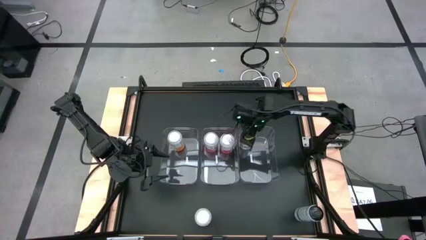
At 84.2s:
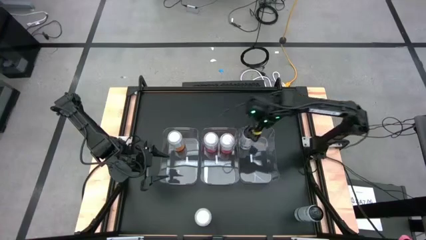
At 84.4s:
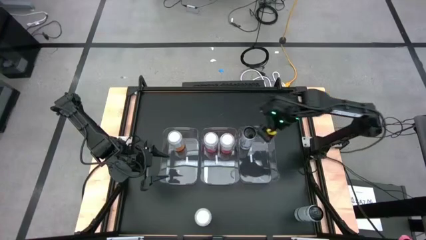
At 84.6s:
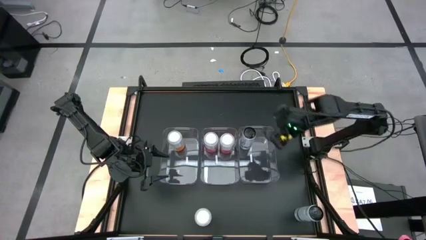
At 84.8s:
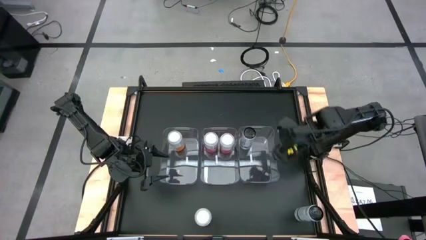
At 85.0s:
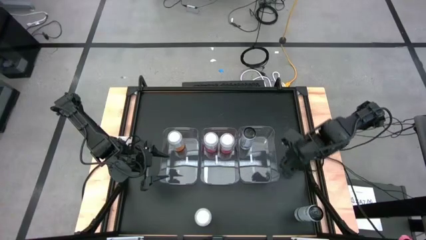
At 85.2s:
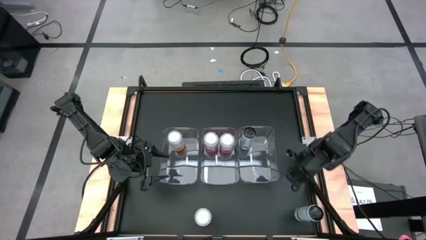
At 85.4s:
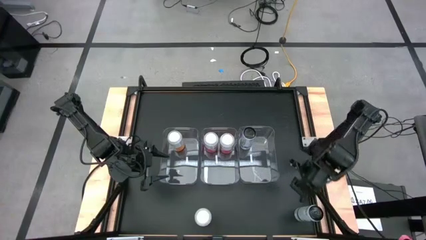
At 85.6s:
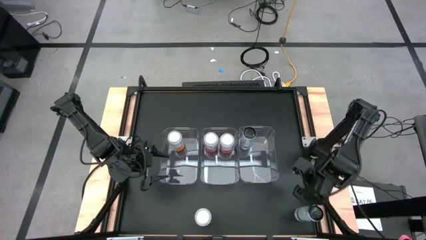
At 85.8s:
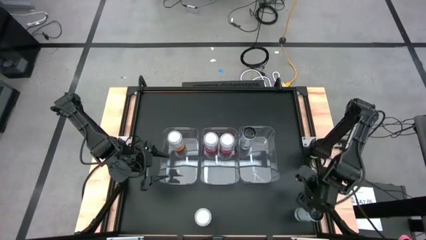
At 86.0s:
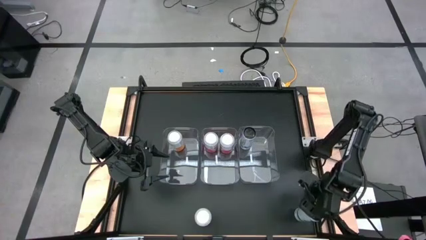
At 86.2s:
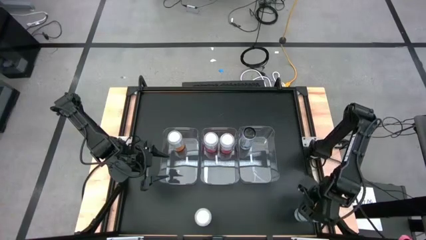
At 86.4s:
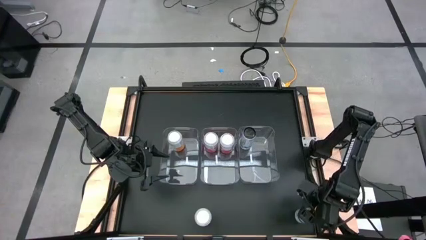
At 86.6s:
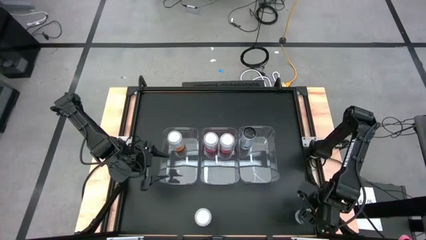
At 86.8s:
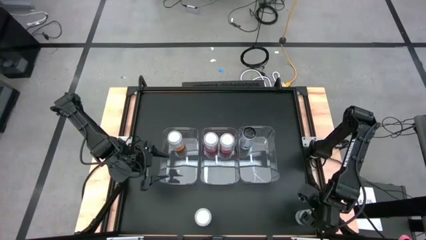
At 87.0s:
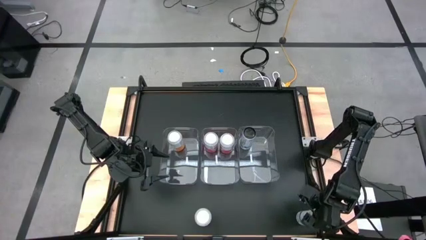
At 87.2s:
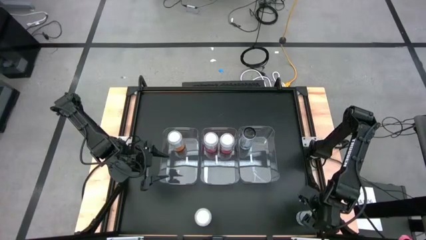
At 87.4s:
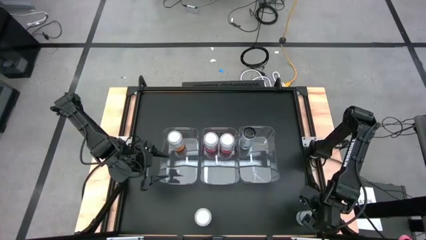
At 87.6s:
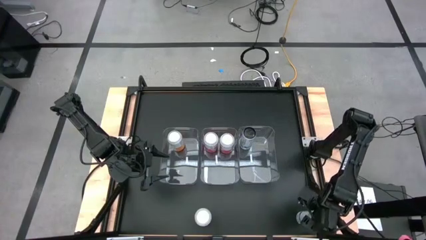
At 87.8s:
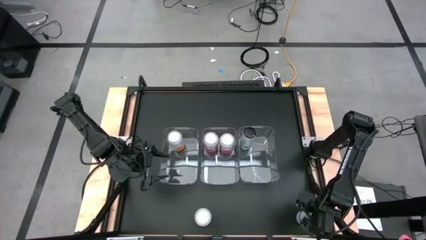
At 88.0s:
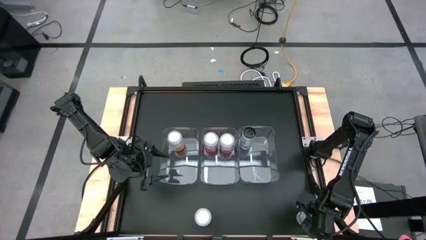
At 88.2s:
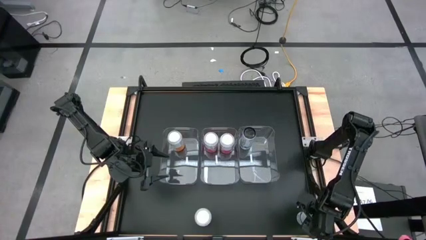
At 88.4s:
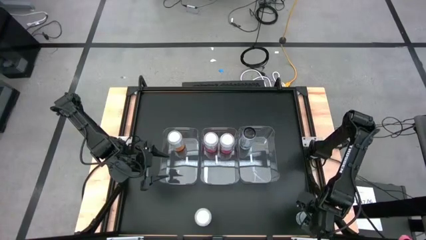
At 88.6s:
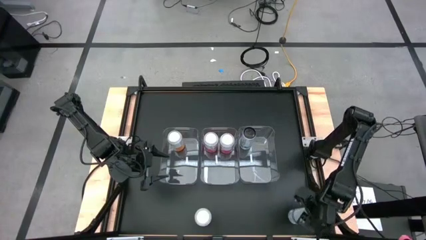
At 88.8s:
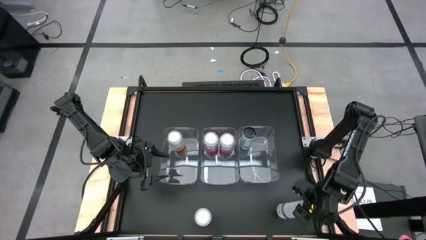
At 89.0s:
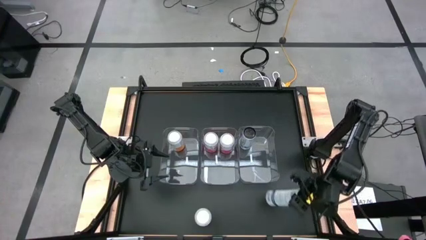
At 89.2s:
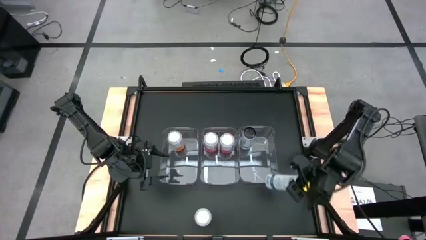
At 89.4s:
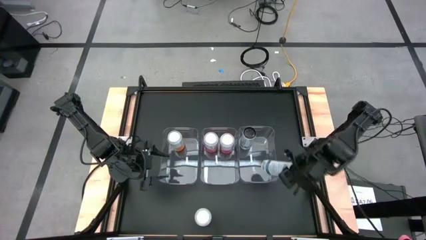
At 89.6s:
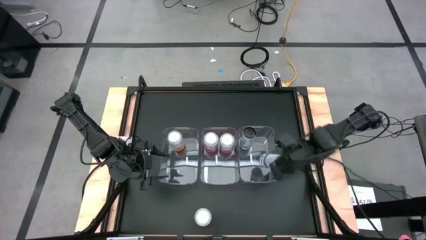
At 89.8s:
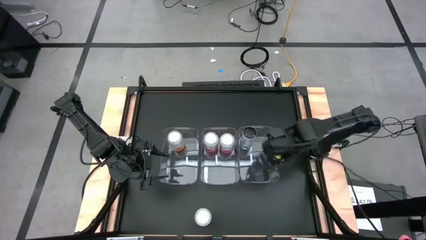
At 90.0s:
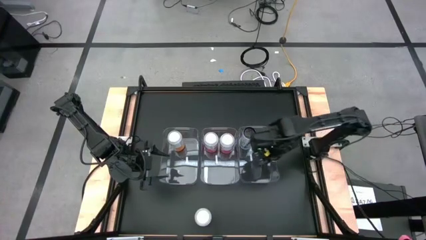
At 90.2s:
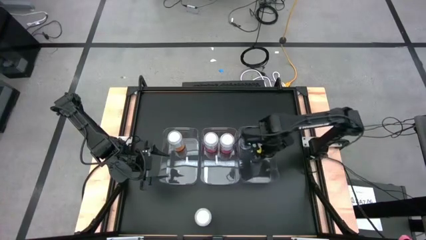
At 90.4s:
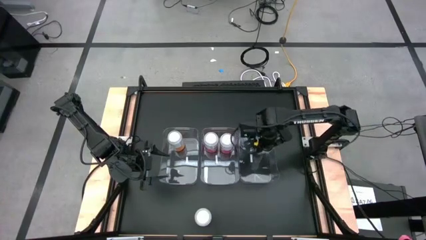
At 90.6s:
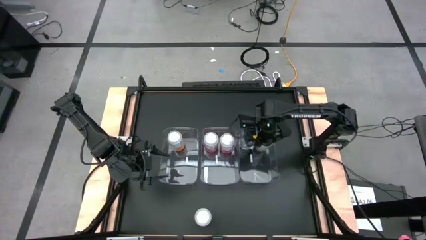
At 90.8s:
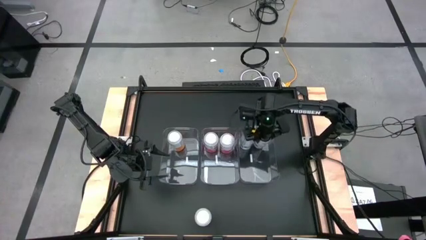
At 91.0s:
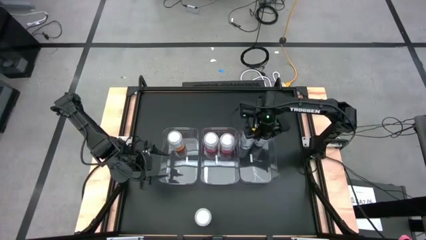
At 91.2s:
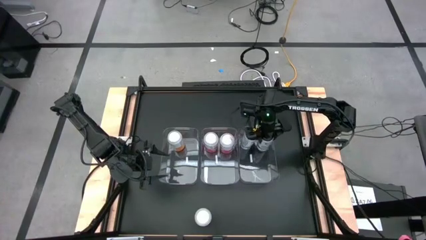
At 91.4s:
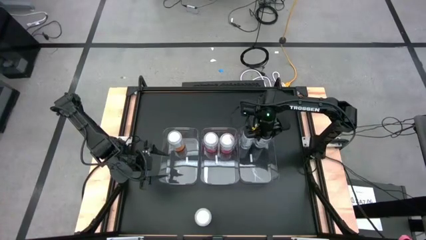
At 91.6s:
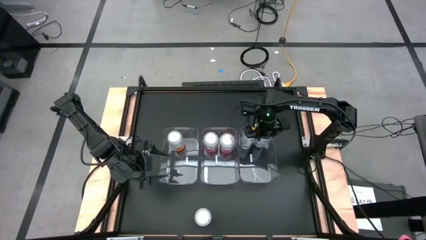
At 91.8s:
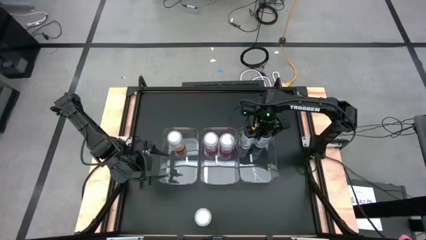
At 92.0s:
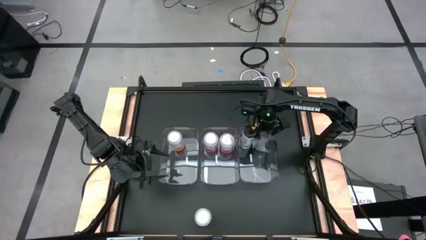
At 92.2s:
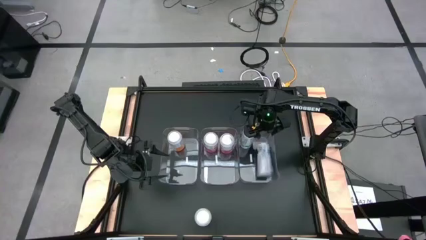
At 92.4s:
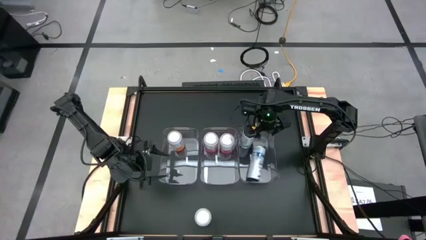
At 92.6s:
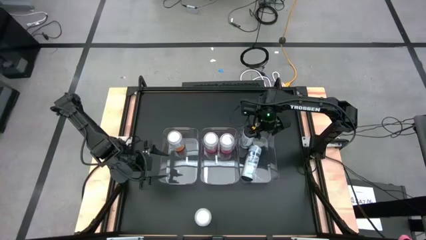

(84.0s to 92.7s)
Task: Sort soda cans
Put the blue soda can into the right transparent bin
